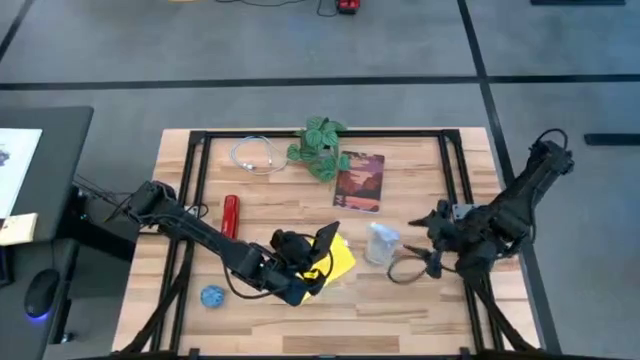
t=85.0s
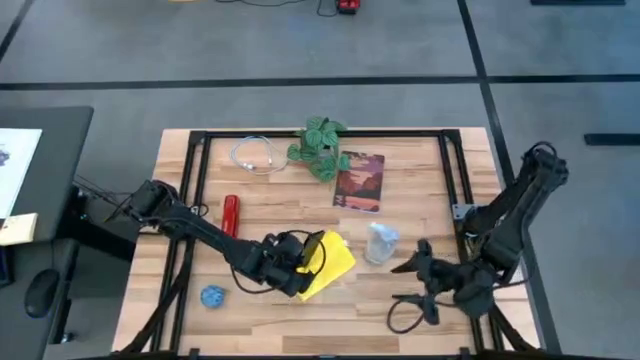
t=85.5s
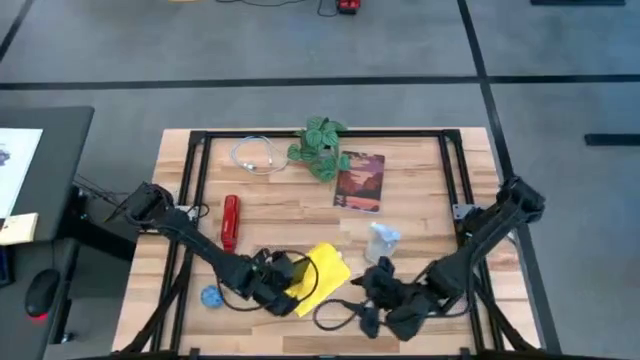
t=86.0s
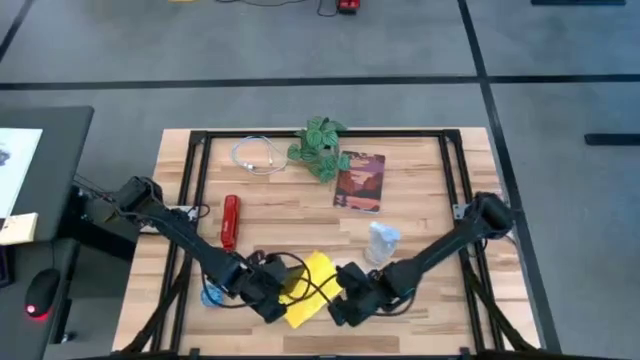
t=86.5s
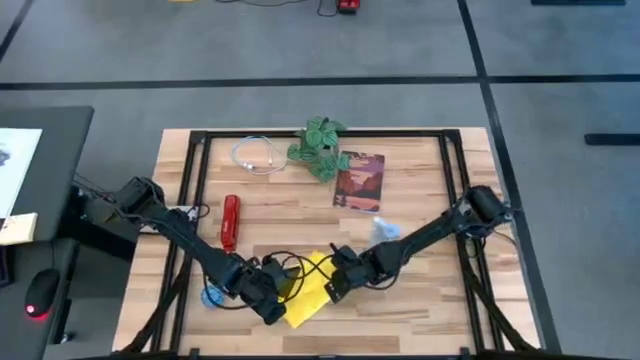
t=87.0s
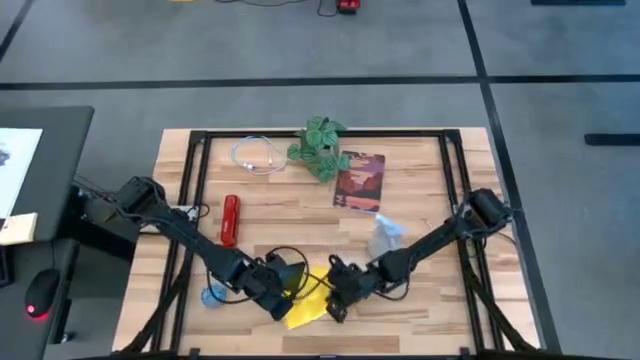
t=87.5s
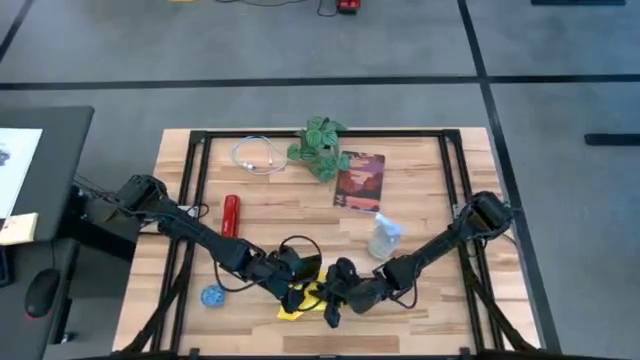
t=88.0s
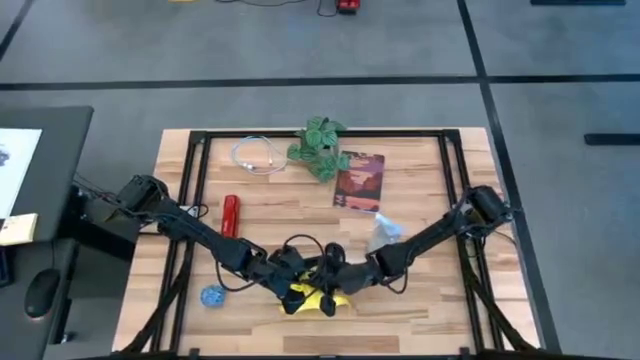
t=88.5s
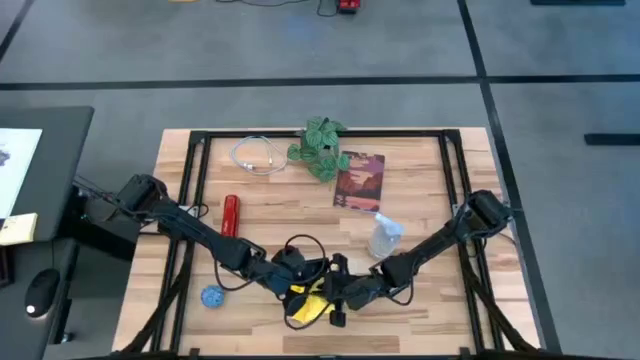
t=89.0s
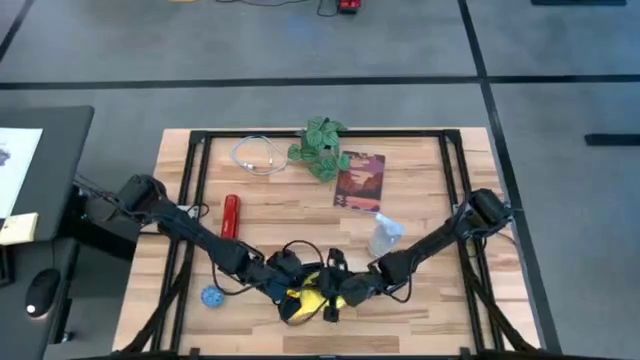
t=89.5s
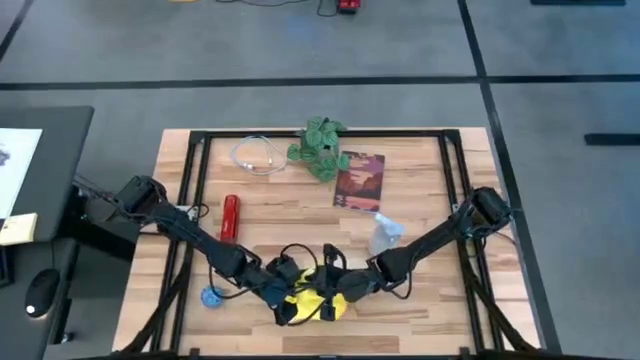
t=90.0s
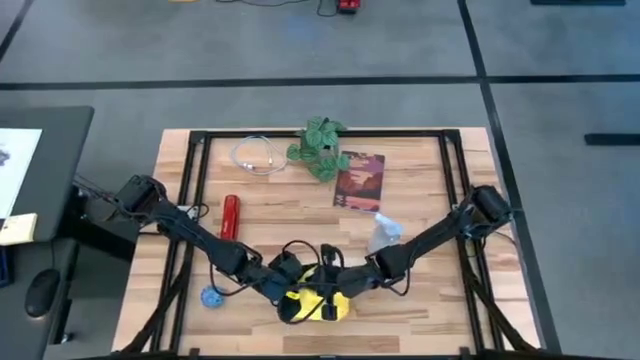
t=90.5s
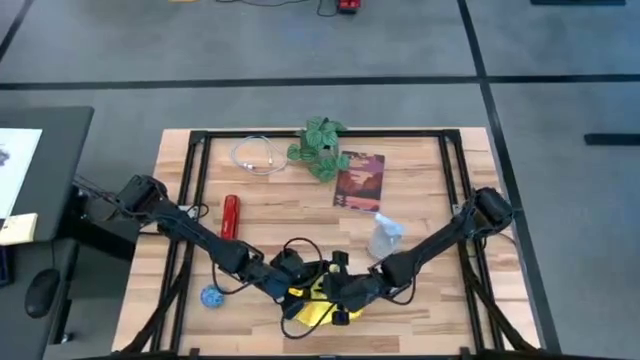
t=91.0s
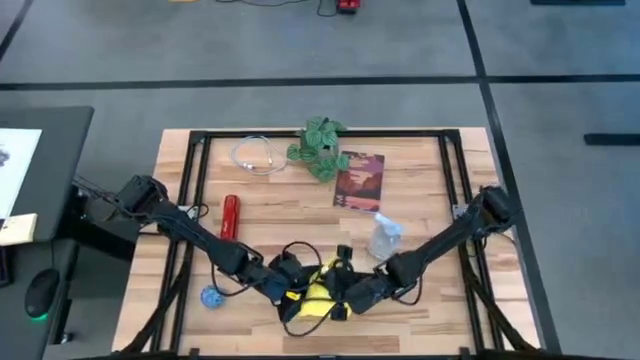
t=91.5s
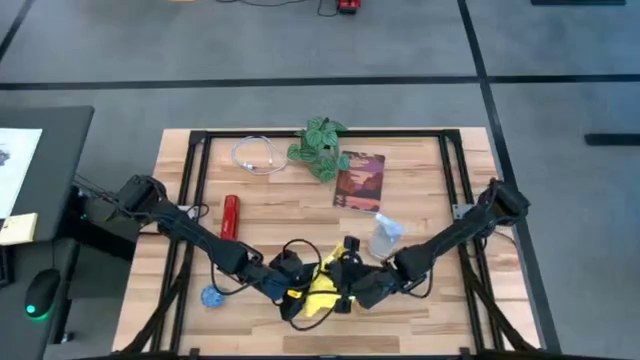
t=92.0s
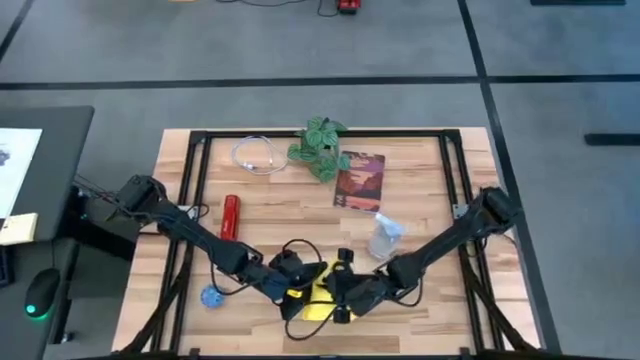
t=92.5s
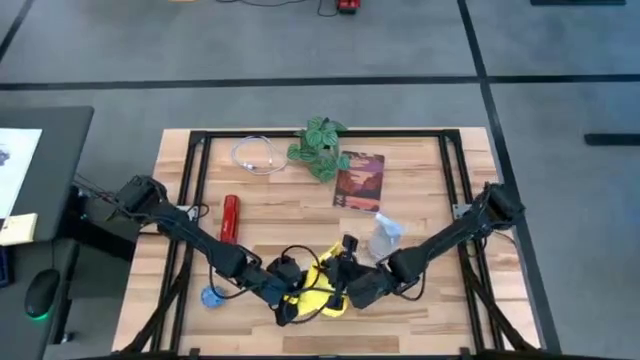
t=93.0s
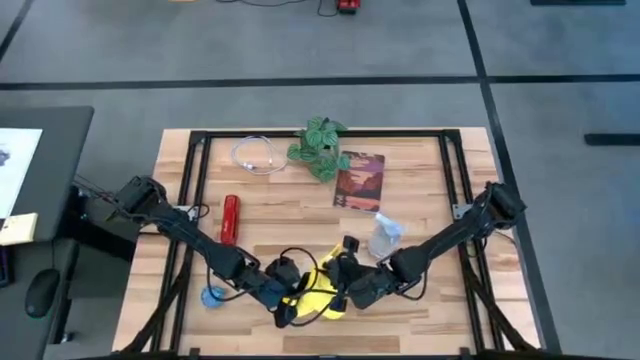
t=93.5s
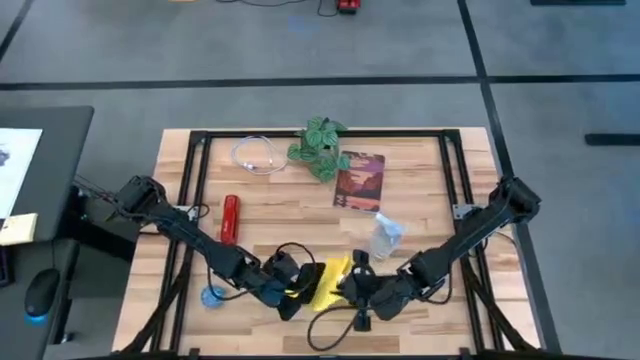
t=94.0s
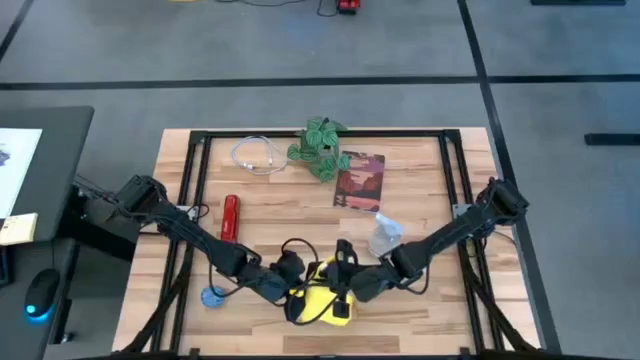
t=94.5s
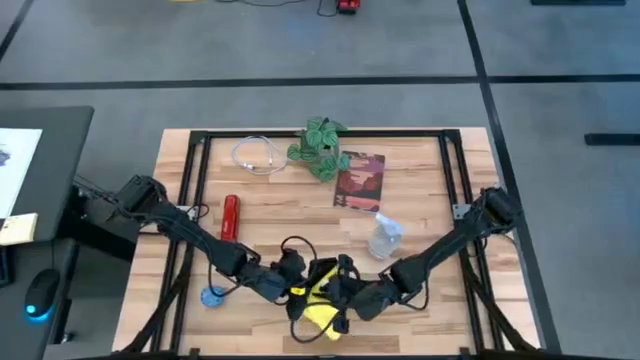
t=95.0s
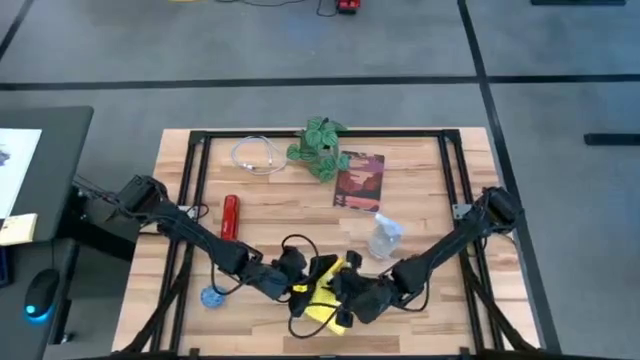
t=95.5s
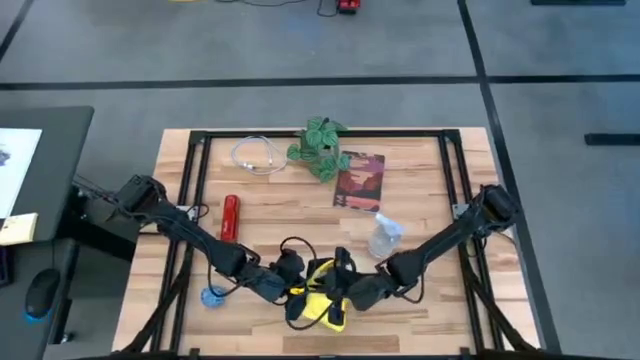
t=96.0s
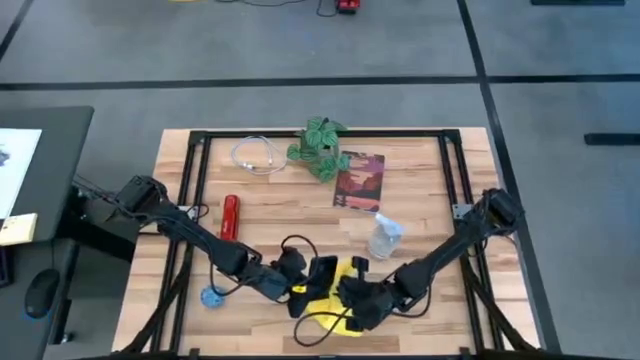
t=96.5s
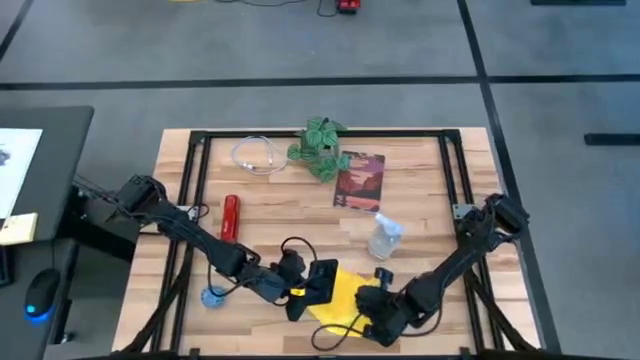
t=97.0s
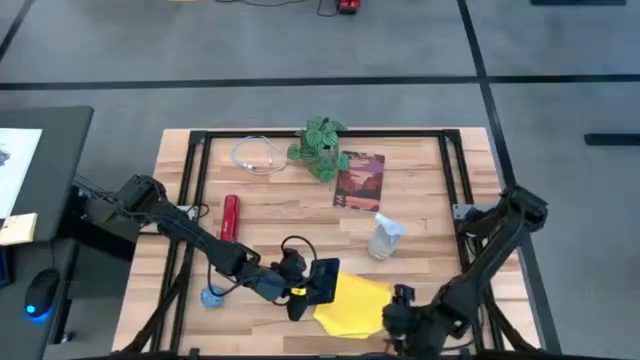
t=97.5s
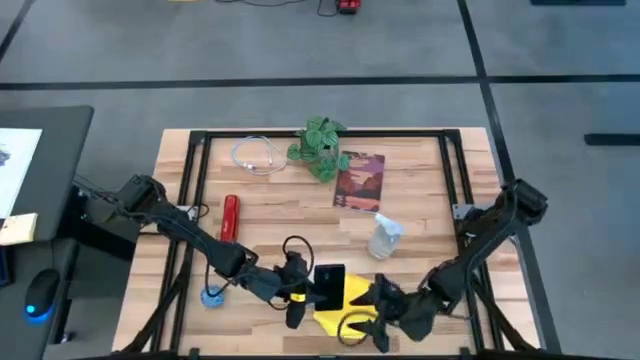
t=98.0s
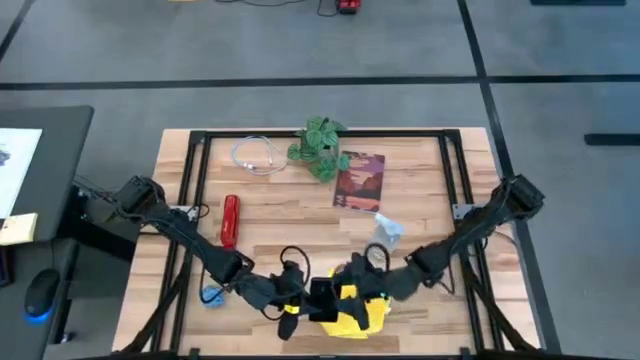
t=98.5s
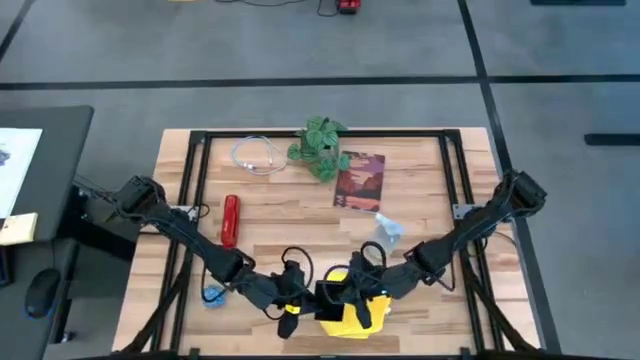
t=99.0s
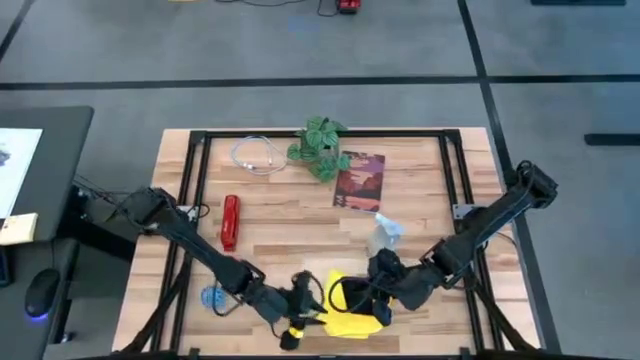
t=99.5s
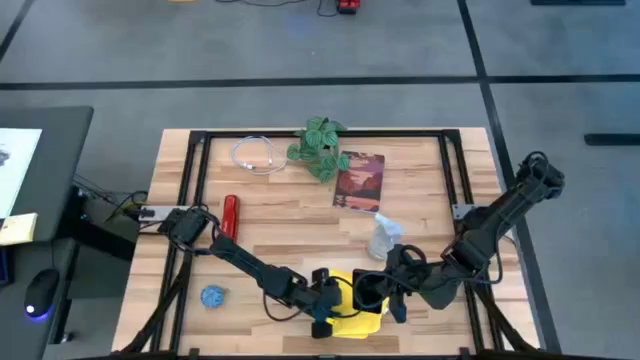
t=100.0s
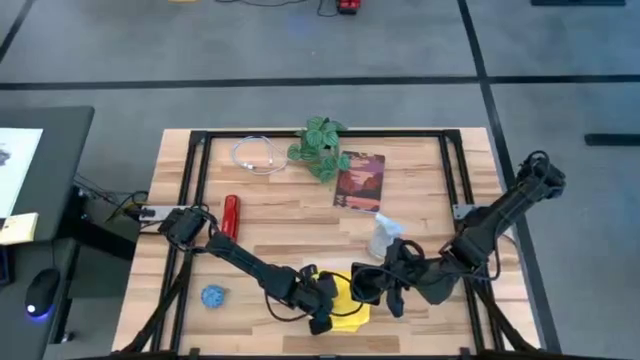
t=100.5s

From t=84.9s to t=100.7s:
Task: Apply microfiber cloth
Wipe the back of the cellphone using the microfiber cloth

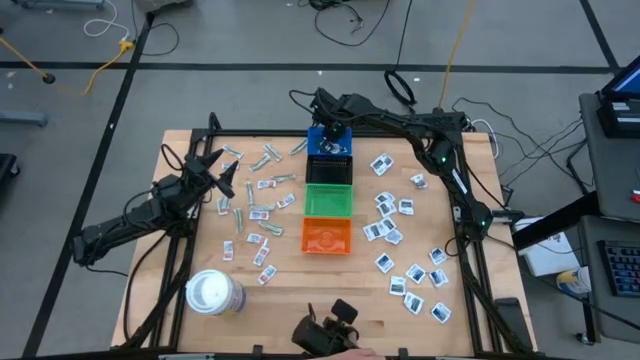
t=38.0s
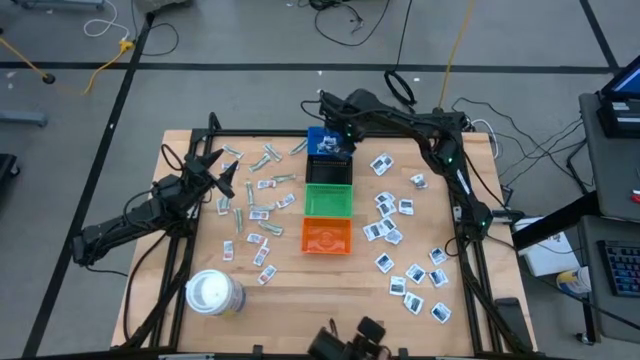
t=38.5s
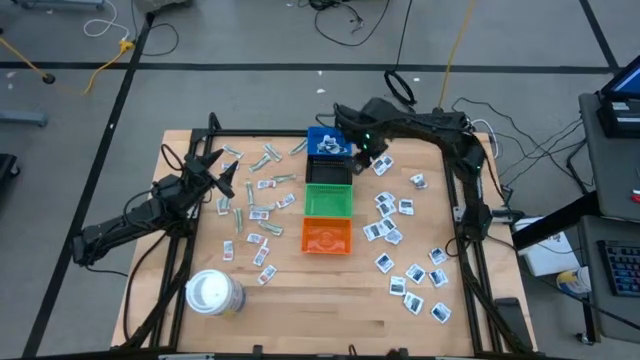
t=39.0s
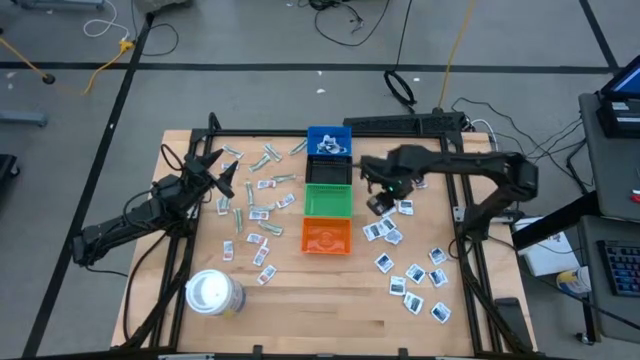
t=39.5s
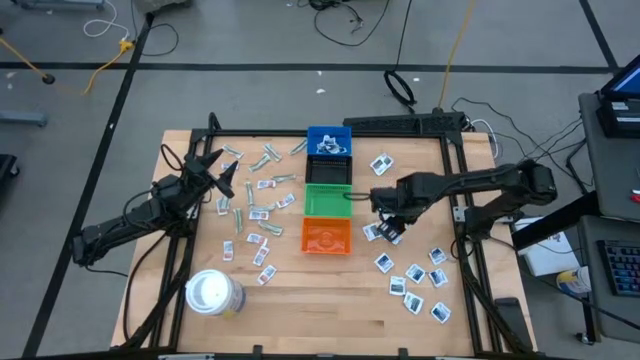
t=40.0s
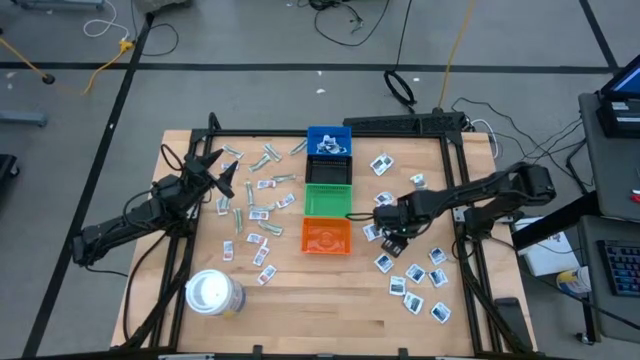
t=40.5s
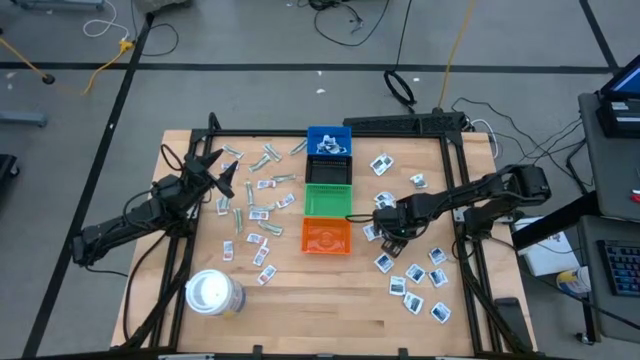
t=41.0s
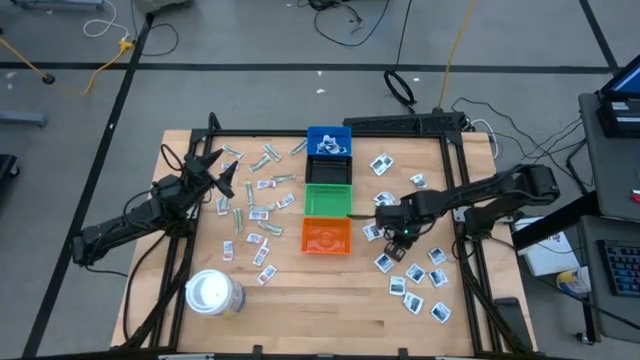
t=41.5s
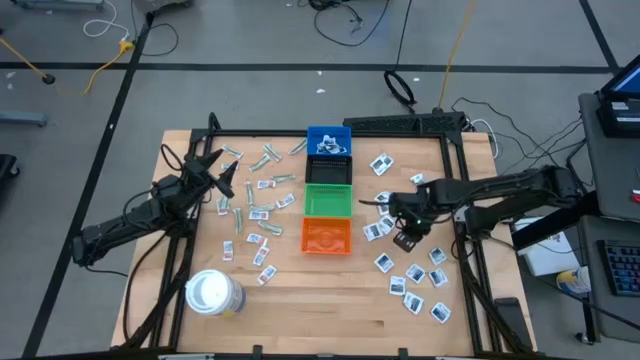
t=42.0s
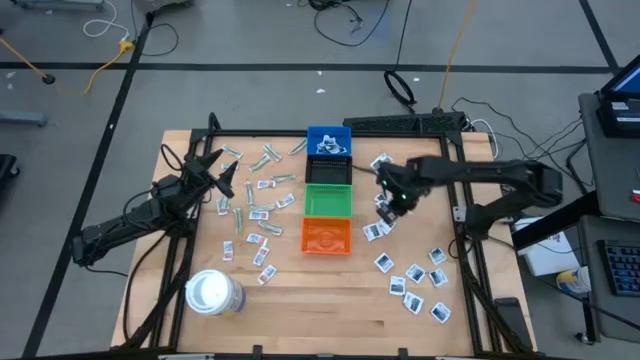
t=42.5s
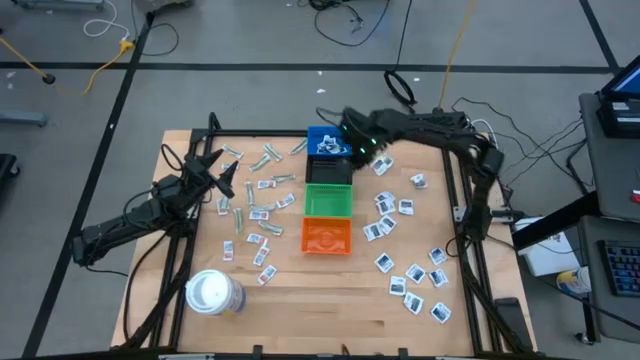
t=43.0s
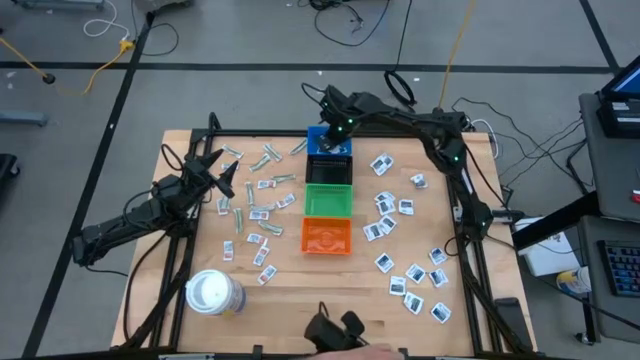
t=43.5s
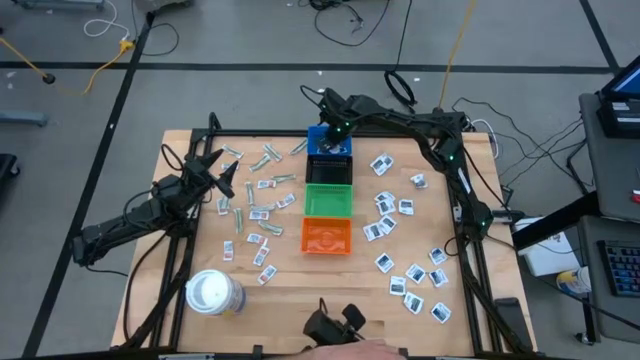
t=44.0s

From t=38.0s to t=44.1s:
Task: Pick & Place First Aid Supplies
Put the blue alcohol pad into the blue bin
